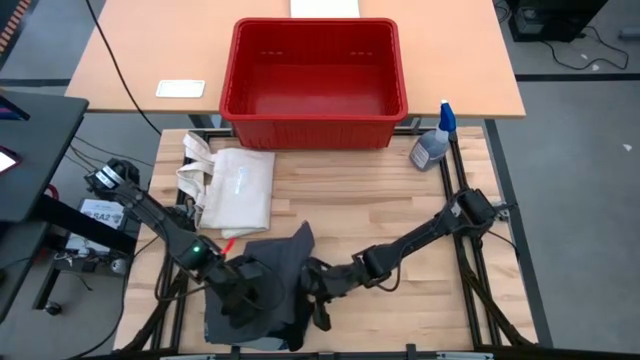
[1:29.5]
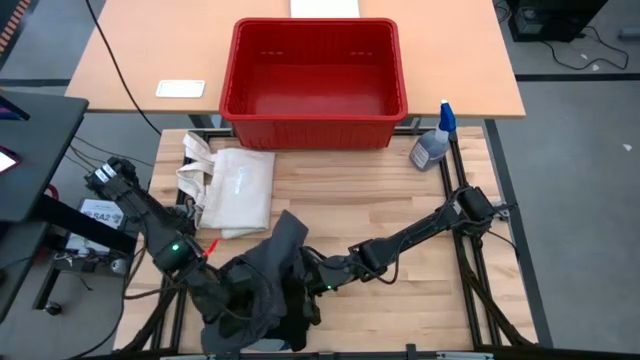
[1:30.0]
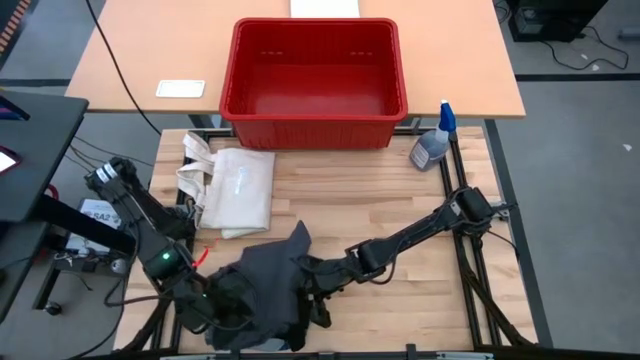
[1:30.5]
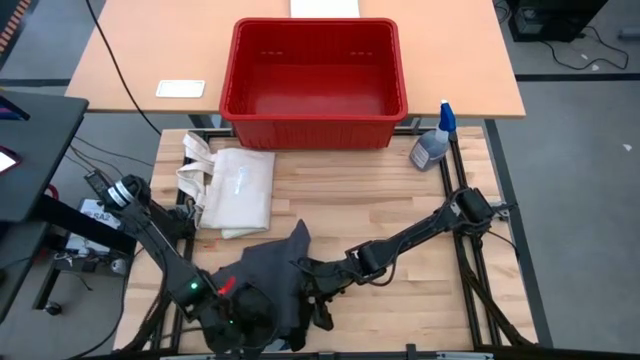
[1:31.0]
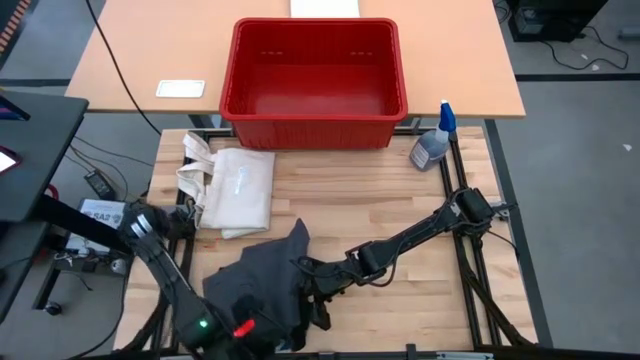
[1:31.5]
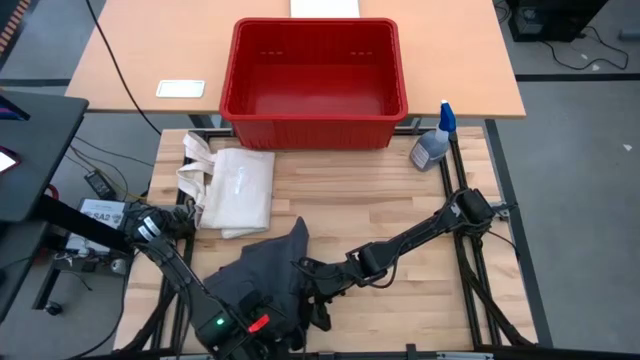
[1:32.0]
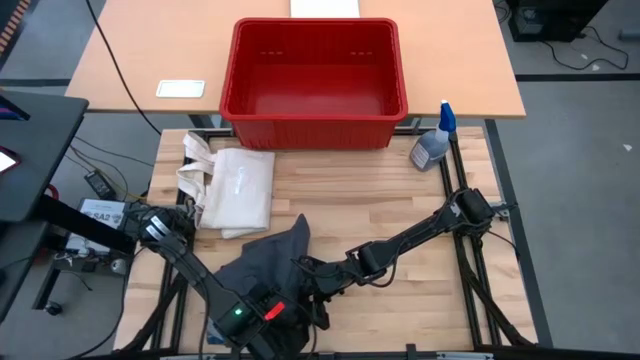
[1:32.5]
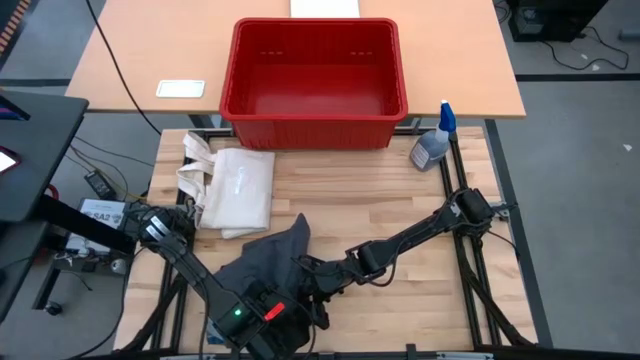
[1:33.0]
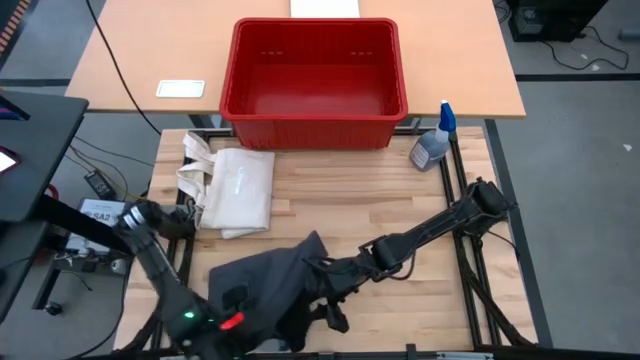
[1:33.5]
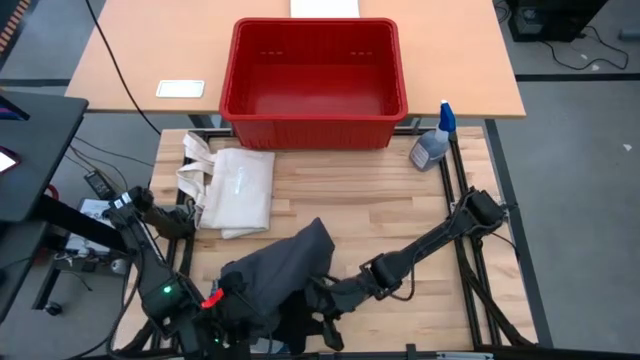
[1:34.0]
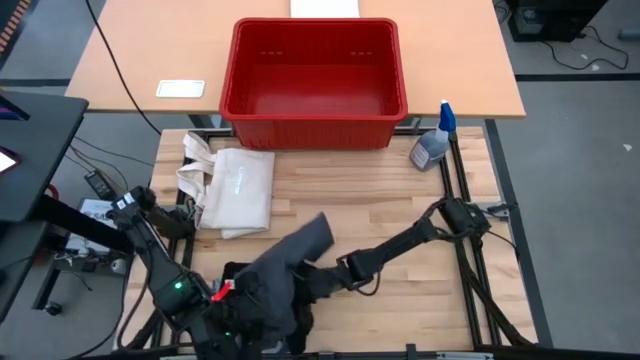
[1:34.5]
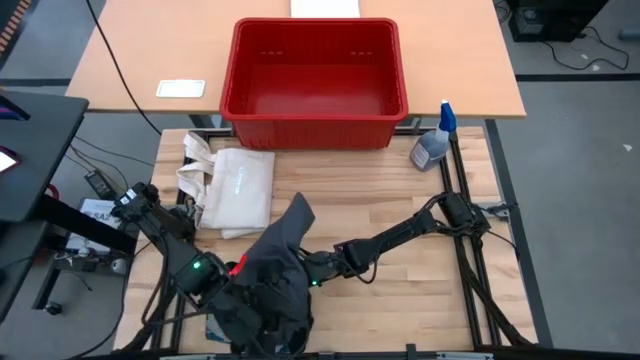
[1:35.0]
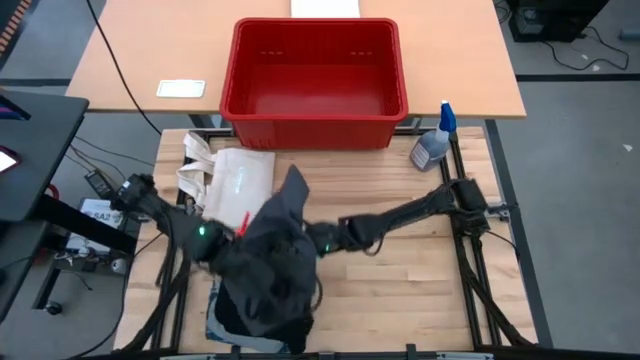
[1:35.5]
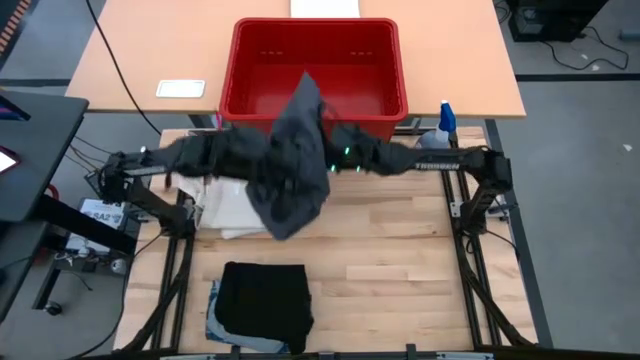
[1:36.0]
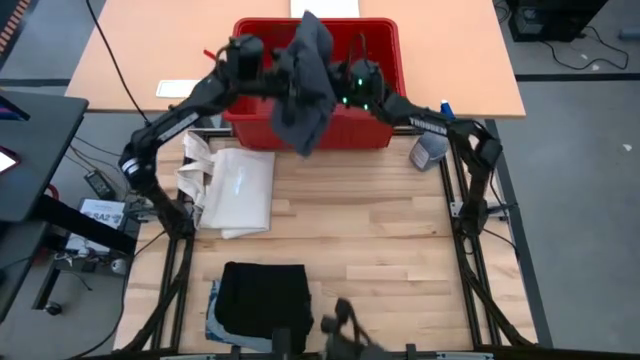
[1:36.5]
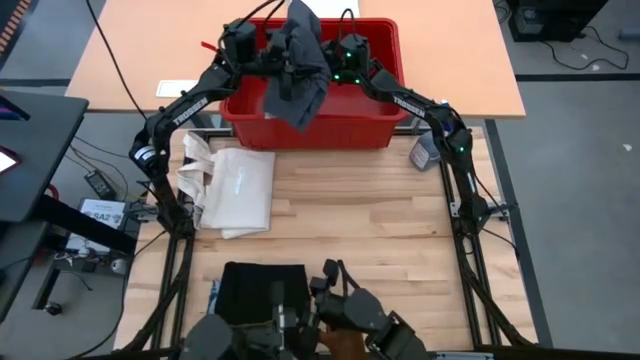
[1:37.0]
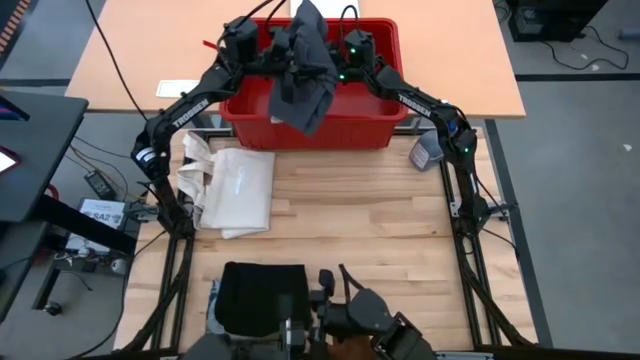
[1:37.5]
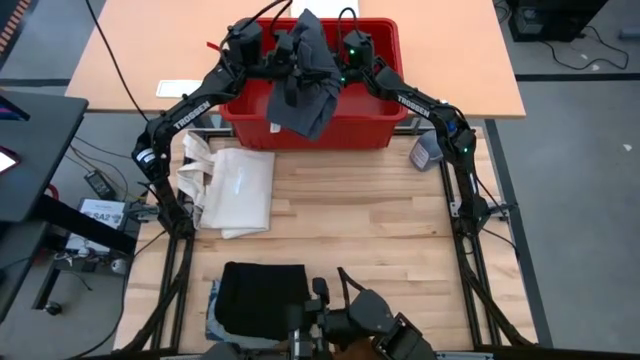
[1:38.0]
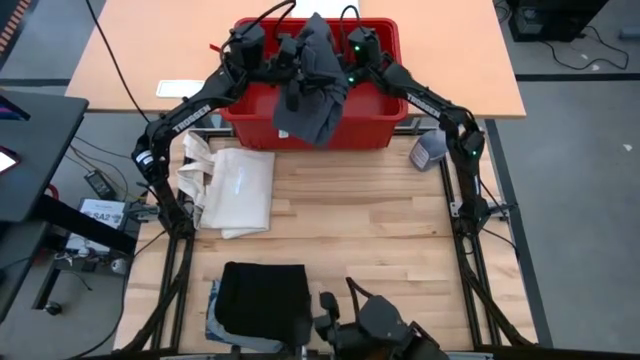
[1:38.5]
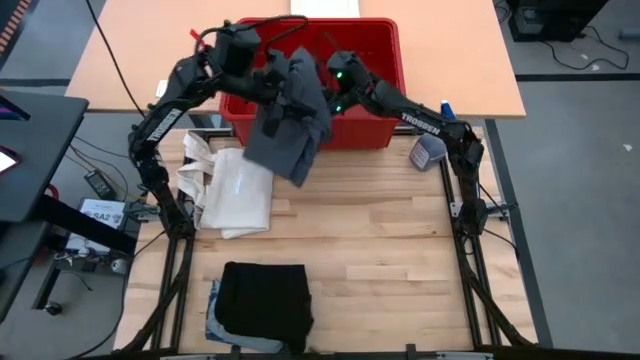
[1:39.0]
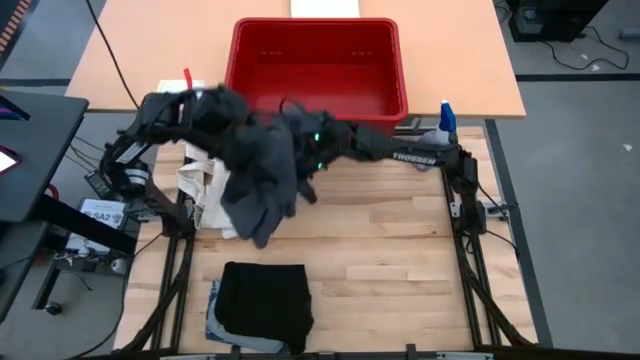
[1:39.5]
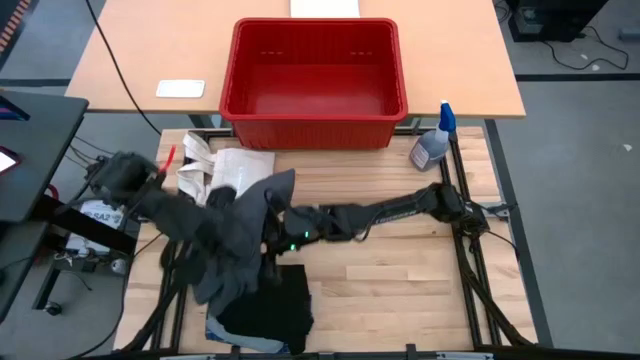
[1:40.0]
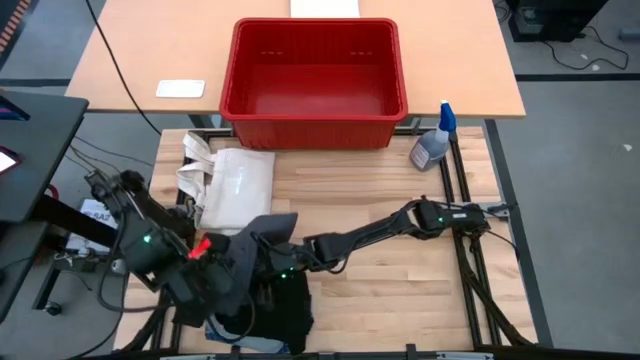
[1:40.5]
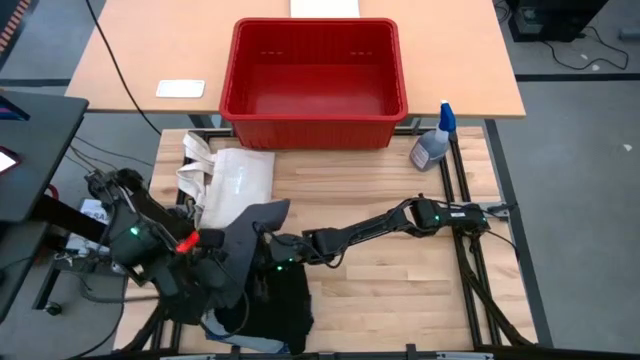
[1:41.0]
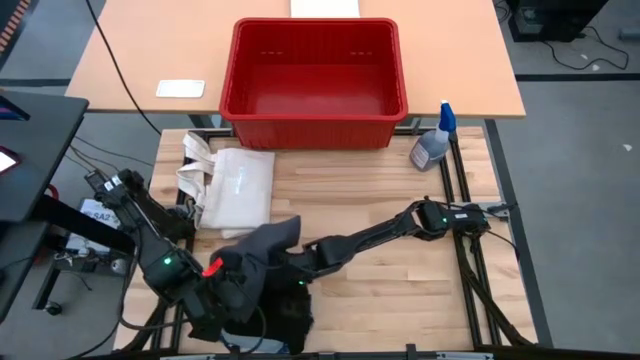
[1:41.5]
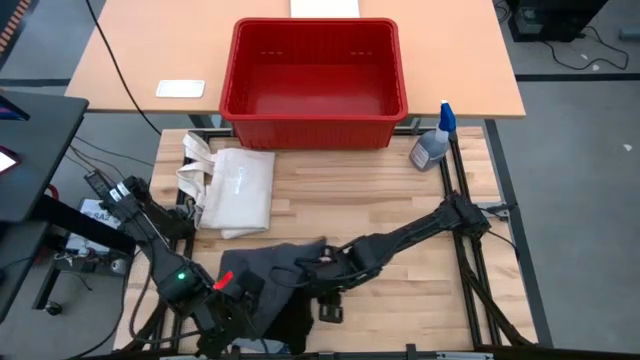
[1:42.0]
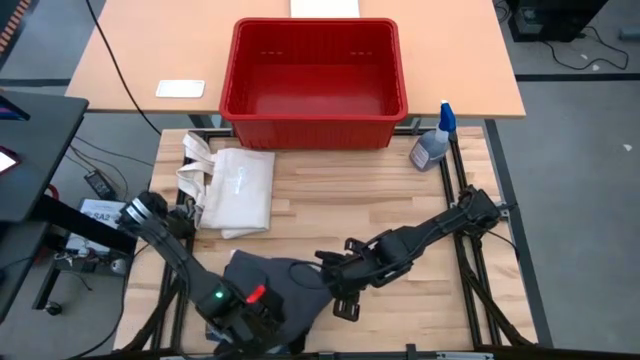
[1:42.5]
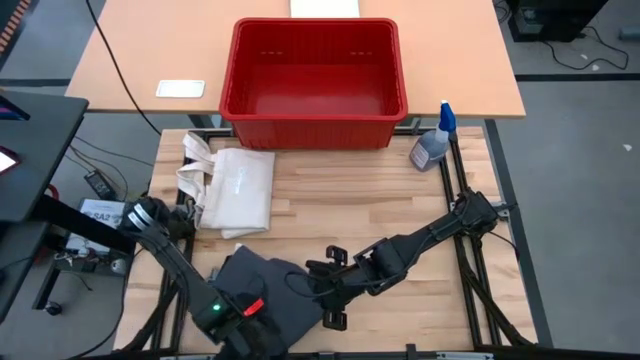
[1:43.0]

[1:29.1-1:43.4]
Task: Sort clothes
Put the stacked clothes into the red bin

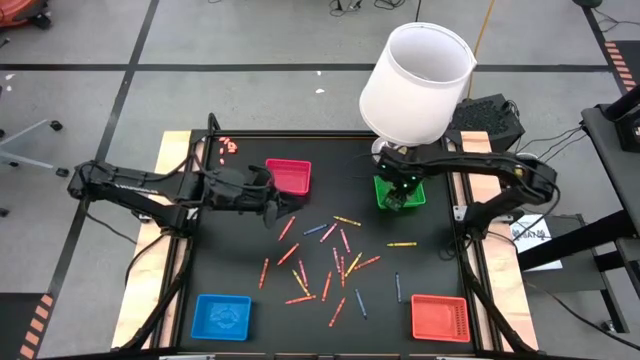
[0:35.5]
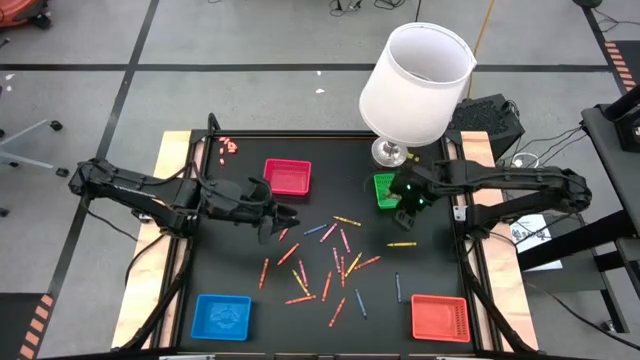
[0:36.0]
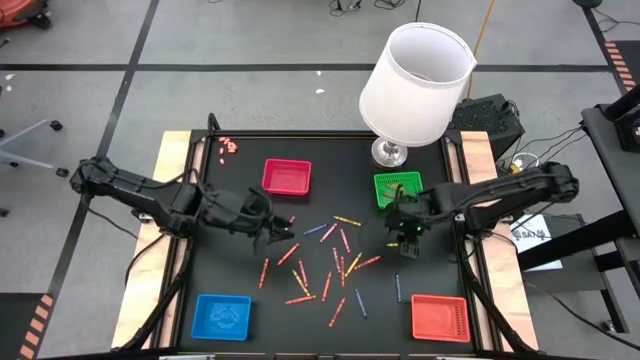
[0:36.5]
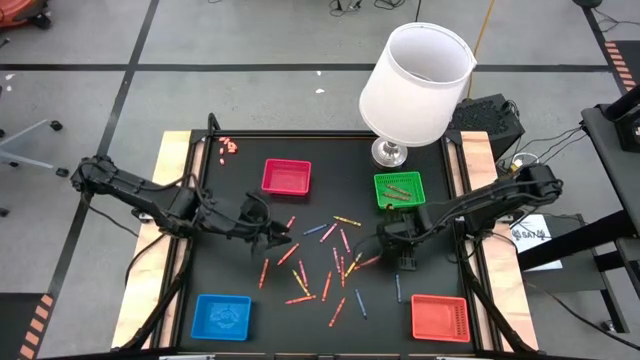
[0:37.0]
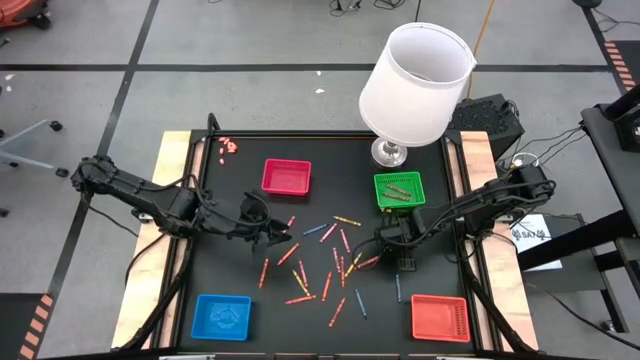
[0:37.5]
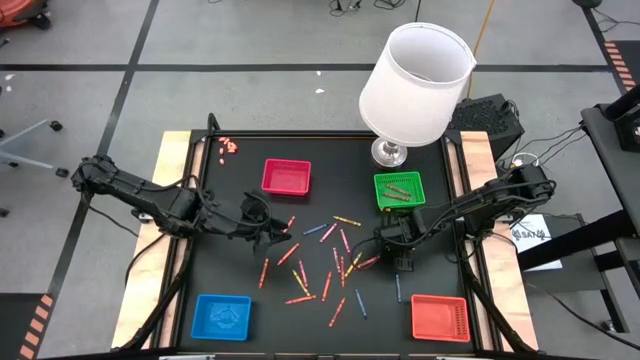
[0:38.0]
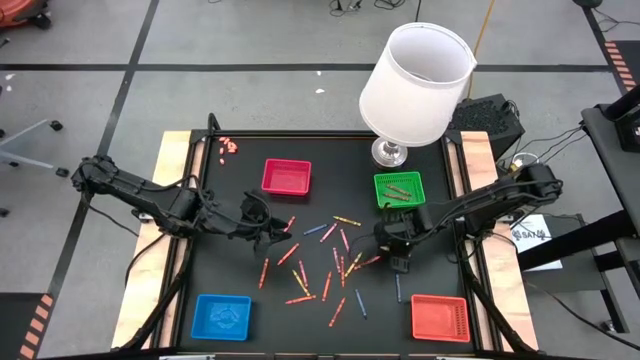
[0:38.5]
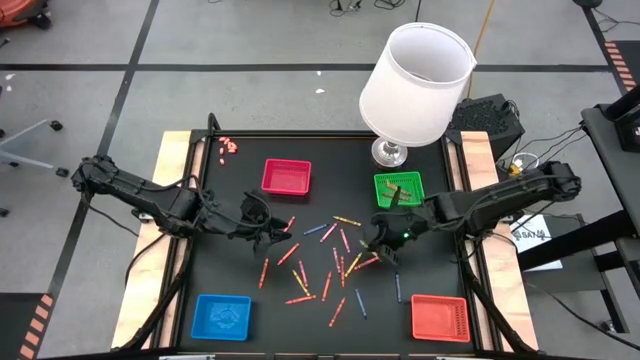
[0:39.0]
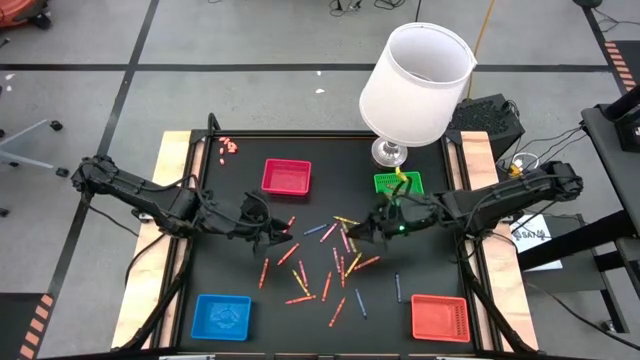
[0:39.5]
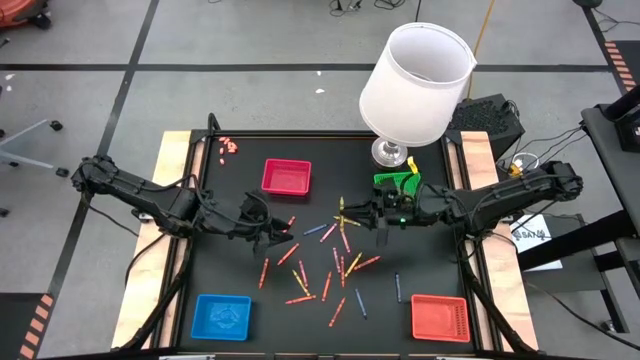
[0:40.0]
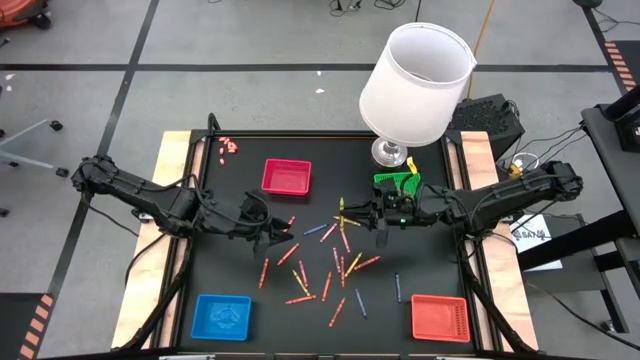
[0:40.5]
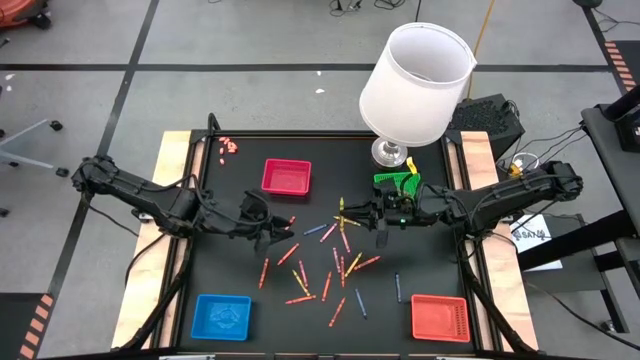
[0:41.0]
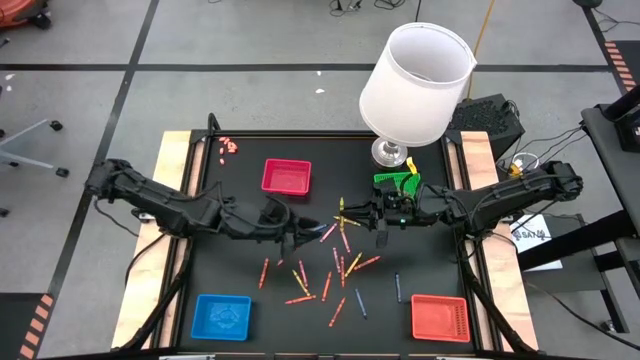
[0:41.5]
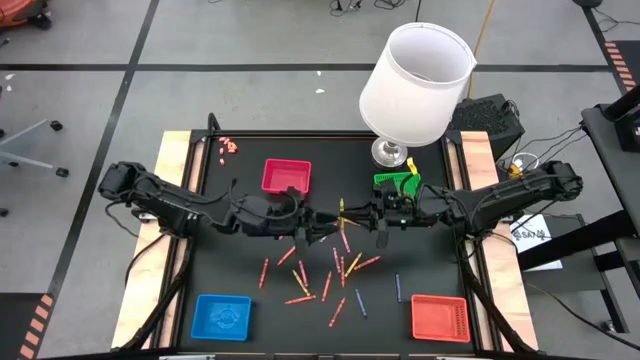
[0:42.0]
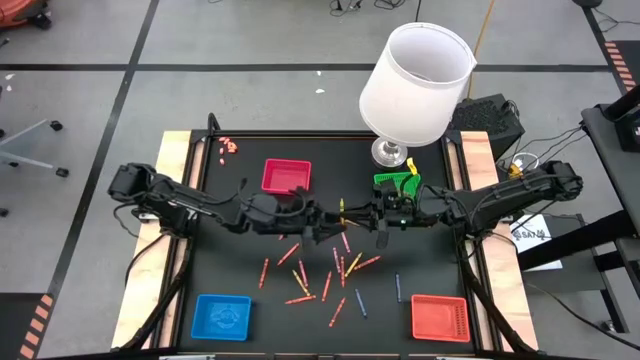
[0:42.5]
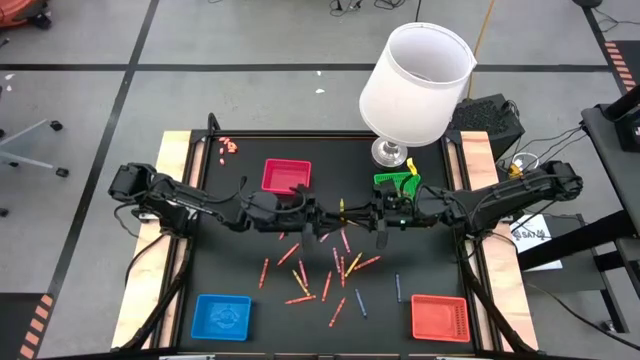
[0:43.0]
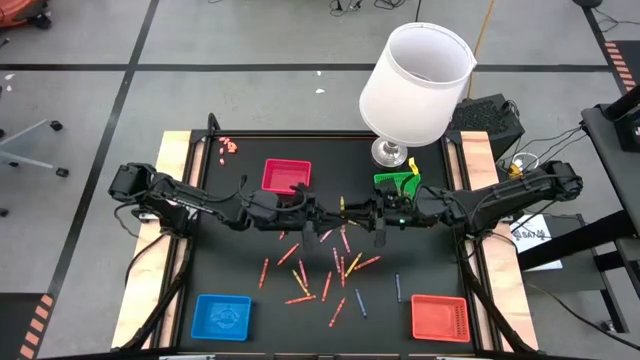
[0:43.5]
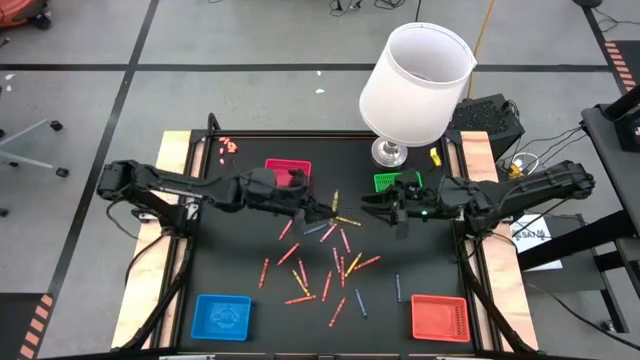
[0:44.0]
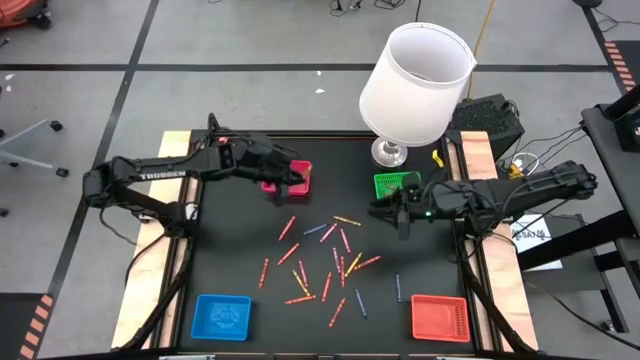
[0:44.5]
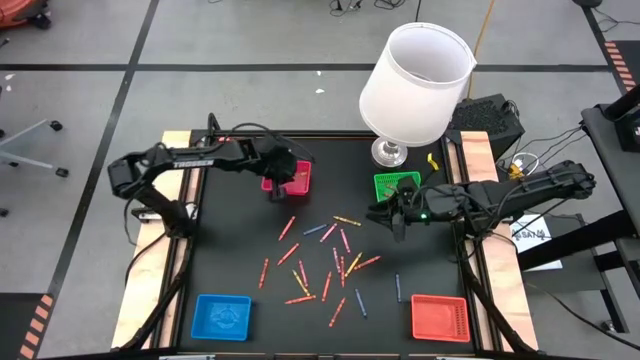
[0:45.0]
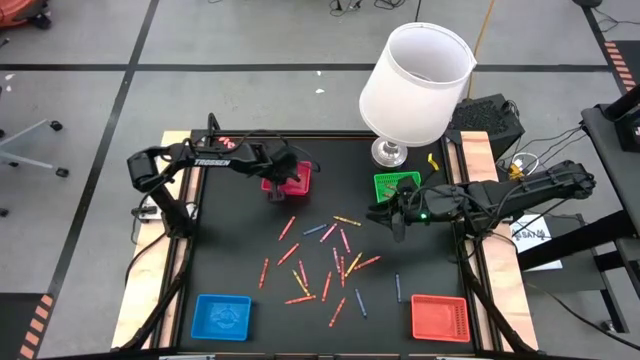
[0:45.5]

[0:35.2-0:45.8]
Task: Sort crayons
Put the yellow crayon into the red basket
